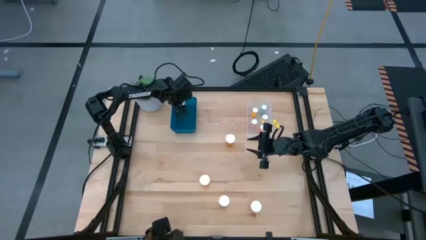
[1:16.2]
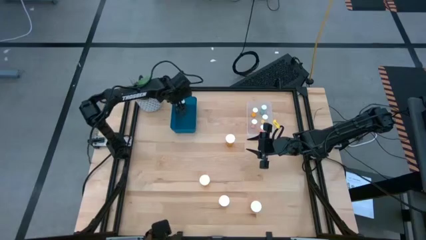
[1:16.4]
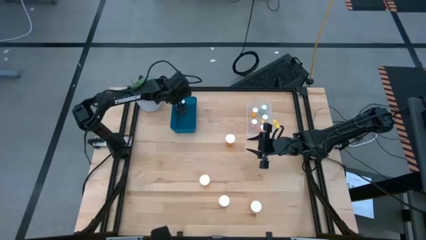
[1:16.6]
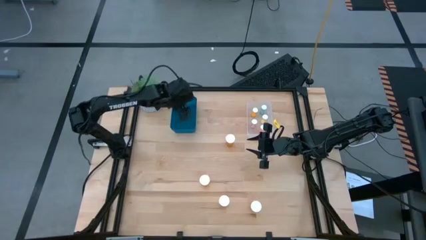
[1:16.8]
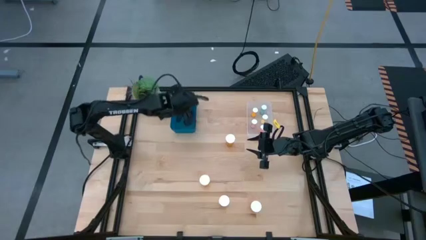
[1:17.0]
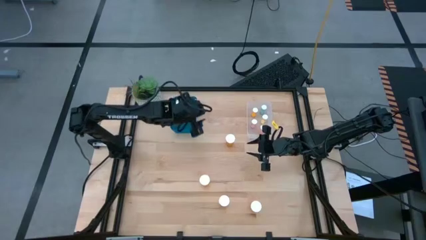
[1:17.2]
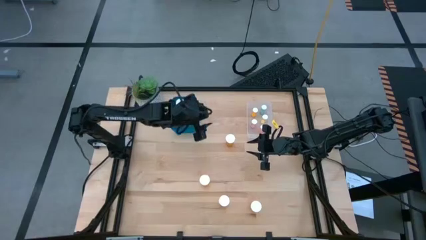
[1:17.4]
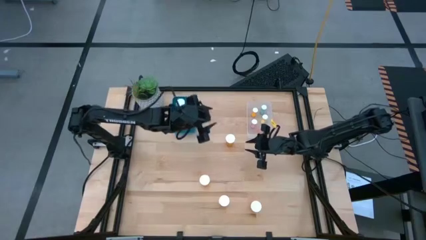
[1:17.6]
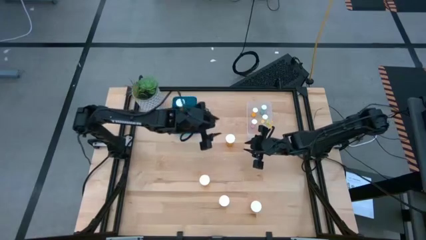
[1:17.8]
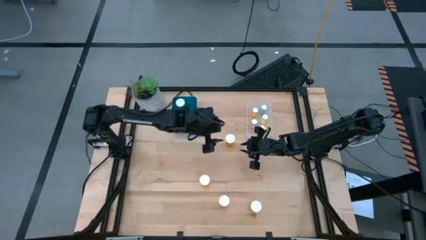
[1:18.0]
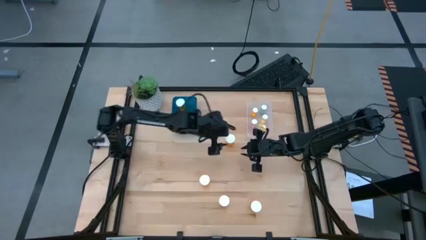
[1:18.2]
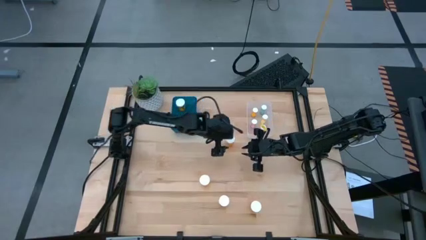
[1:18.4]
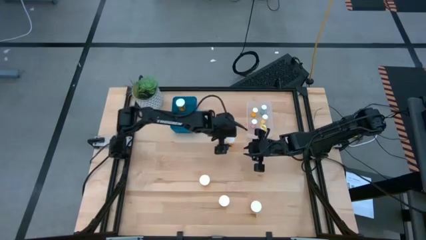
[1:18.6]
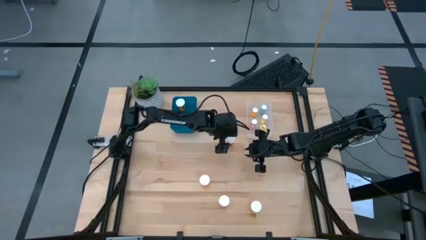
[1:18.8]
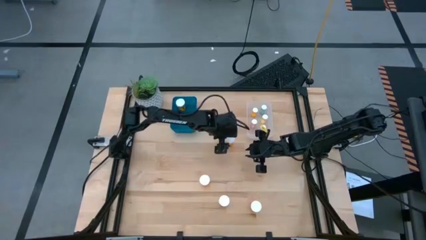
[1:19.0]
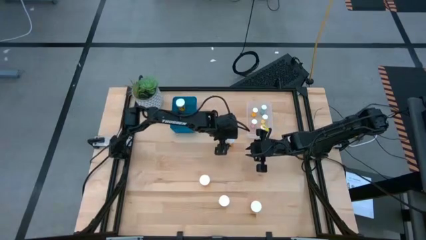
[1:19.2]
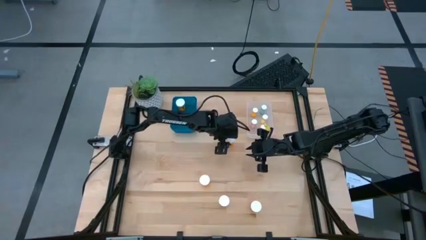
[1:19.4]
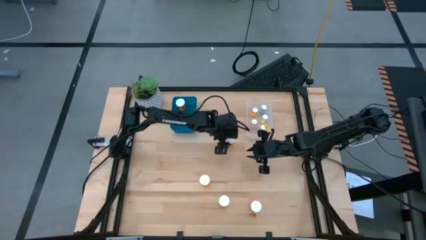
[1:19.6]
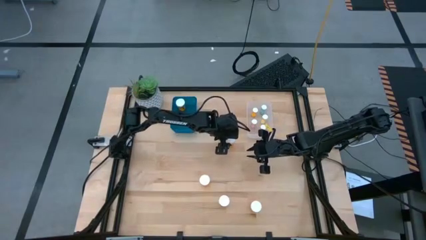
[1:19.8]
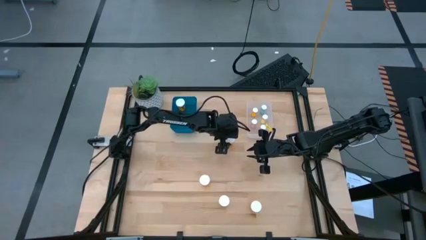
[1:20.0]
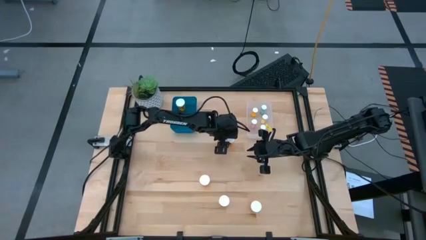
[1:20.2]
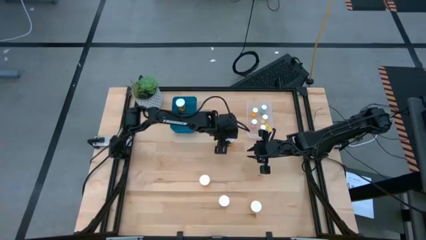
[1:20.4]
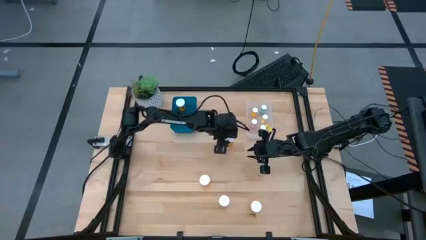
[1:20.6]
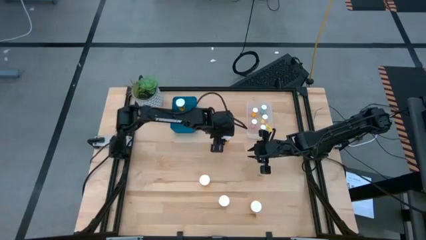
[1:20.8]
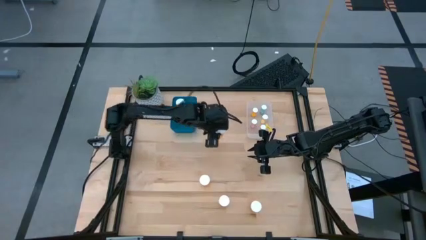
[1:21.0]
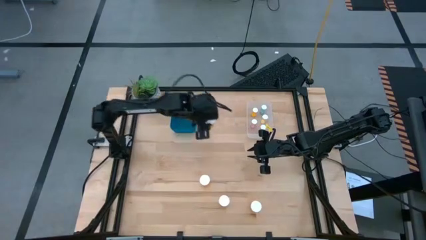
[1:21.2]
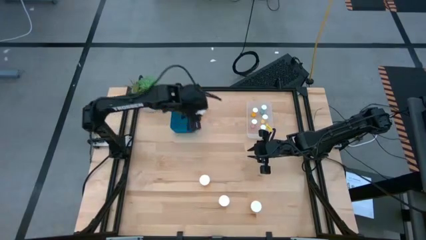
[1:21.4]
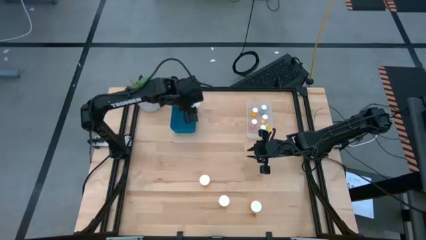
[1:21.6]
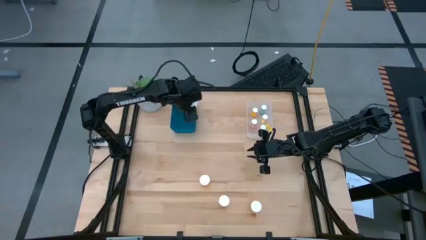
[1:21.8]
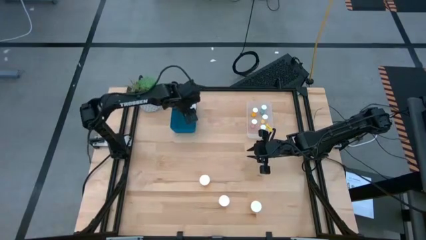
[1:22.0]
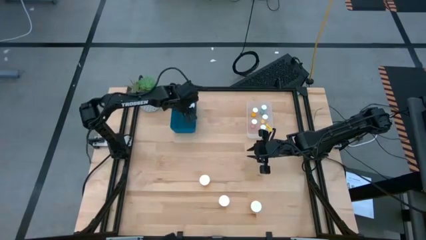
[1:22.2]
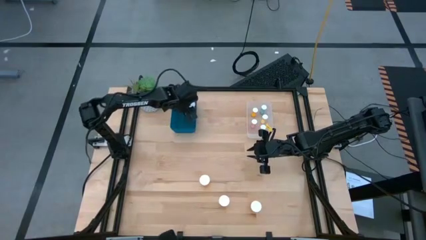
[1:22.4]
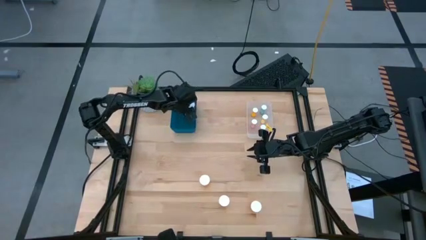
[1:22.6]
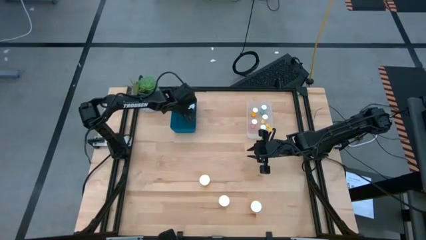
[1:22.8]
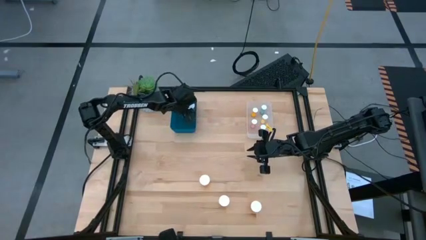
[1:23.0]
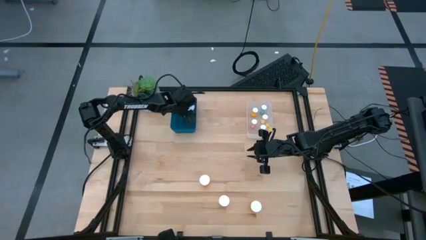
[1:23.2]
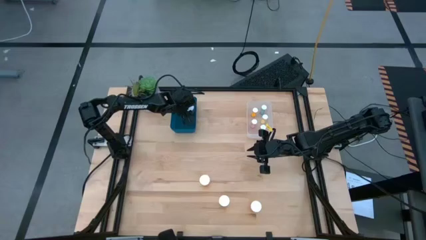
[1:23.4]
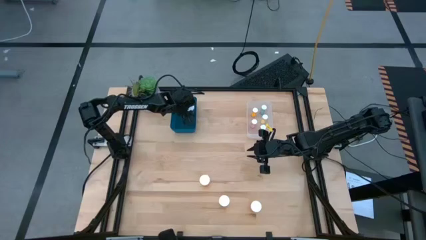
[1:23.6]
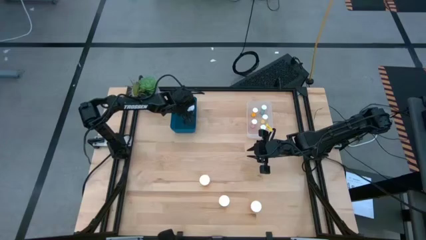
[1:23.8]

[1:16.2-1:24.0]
Task: Pick and place medicine bottles into bin by pill shape (circle, oval)
Put the large orange pill bottle into the blue bin

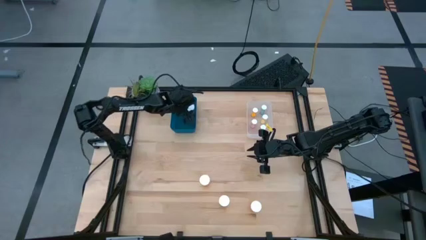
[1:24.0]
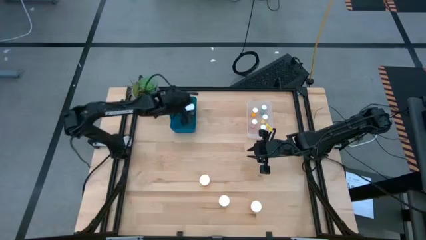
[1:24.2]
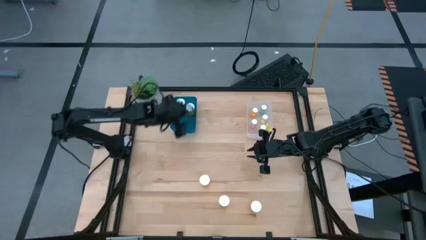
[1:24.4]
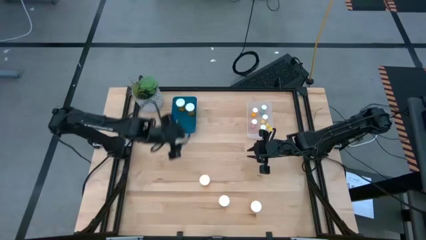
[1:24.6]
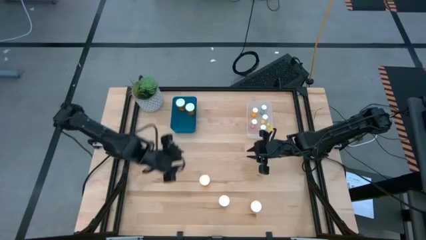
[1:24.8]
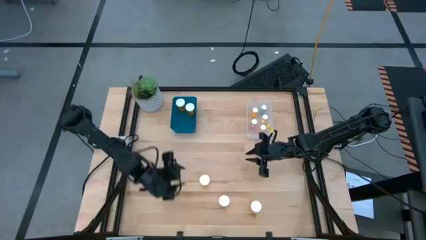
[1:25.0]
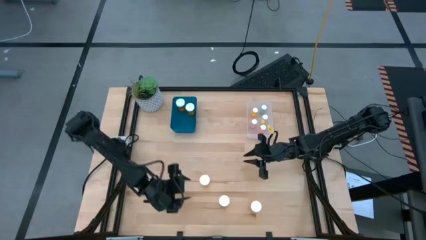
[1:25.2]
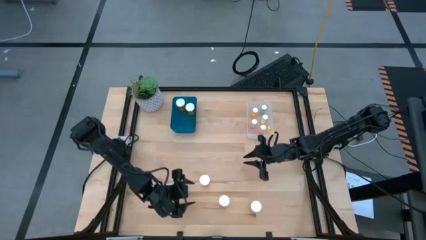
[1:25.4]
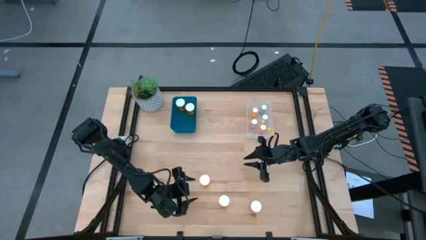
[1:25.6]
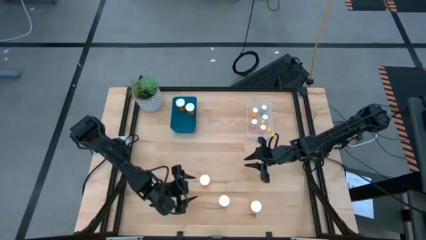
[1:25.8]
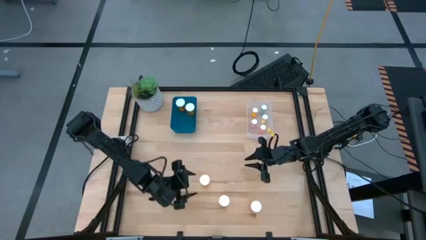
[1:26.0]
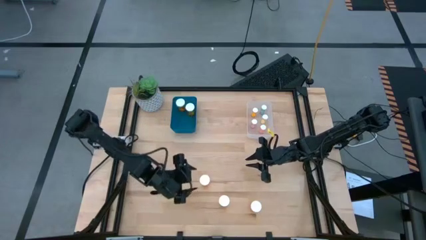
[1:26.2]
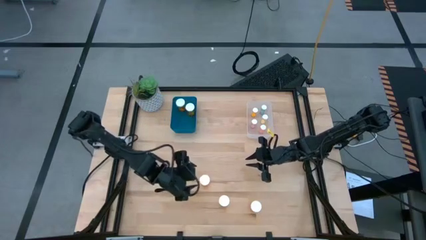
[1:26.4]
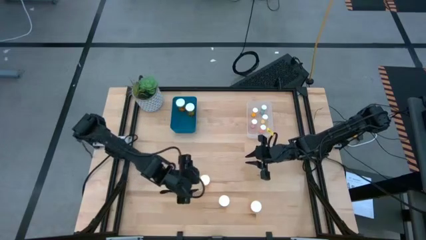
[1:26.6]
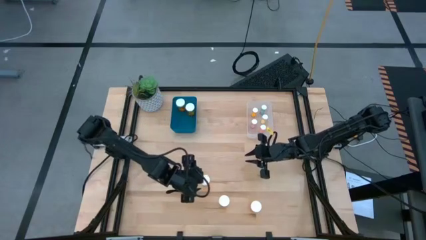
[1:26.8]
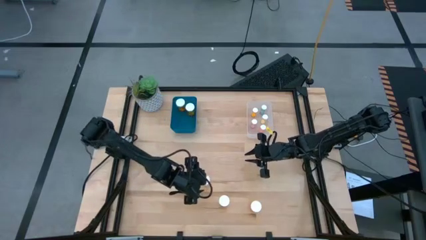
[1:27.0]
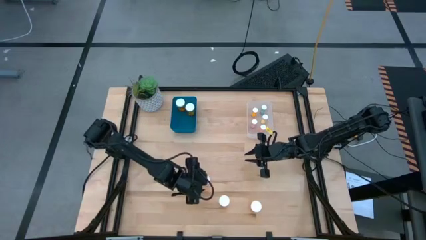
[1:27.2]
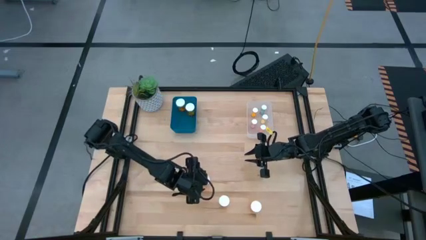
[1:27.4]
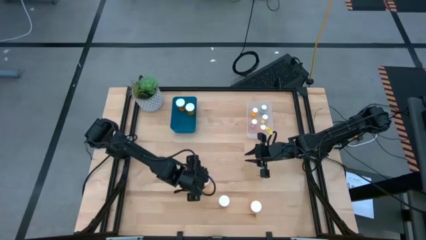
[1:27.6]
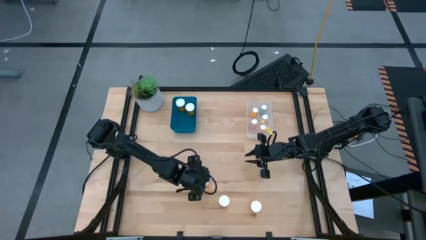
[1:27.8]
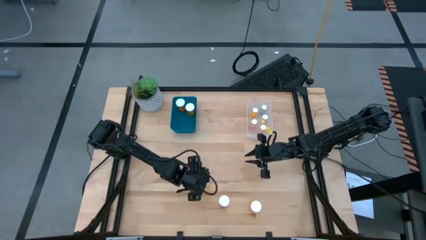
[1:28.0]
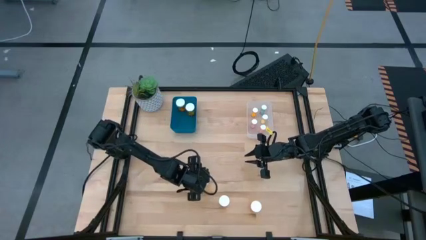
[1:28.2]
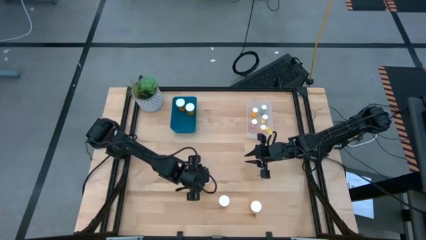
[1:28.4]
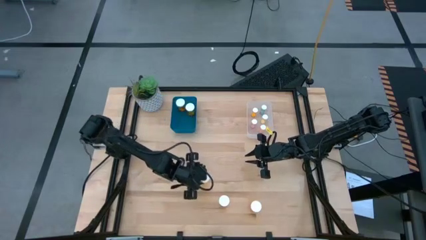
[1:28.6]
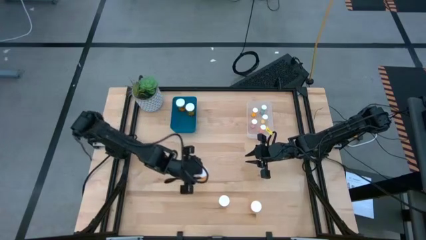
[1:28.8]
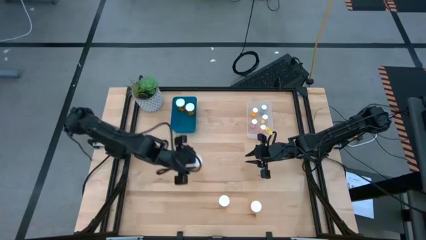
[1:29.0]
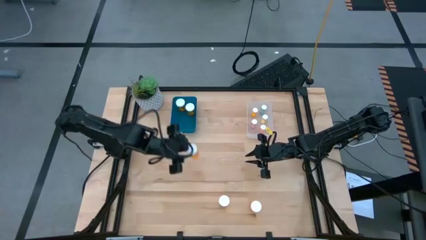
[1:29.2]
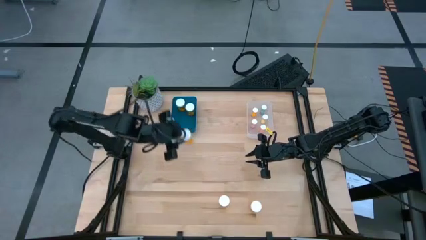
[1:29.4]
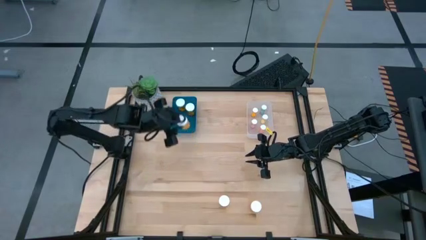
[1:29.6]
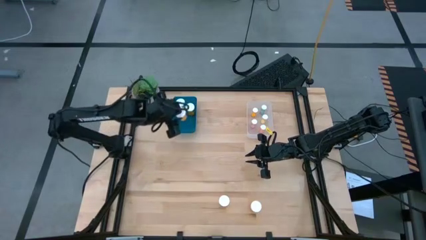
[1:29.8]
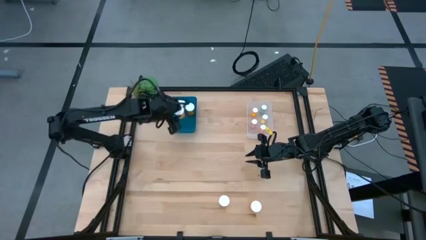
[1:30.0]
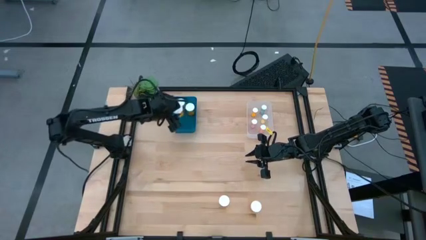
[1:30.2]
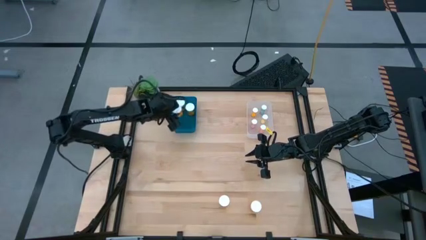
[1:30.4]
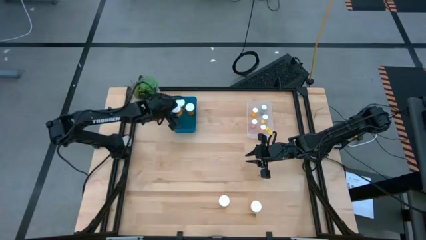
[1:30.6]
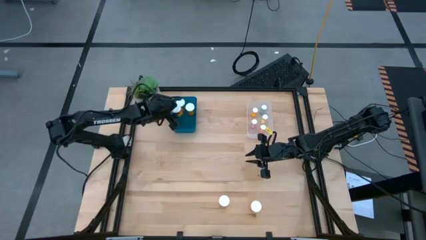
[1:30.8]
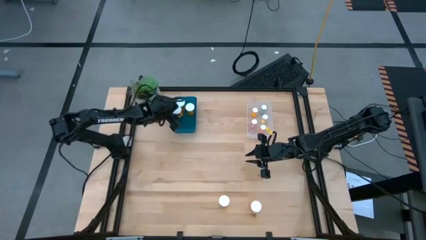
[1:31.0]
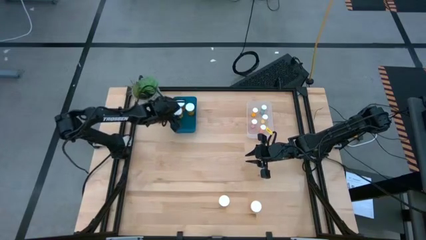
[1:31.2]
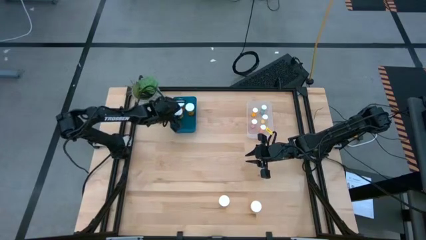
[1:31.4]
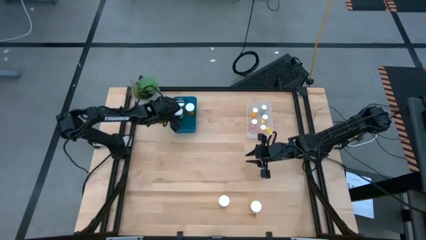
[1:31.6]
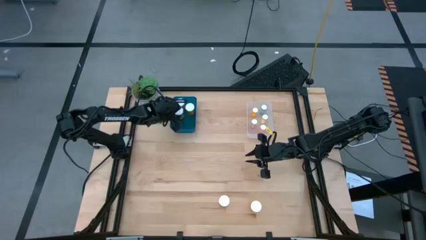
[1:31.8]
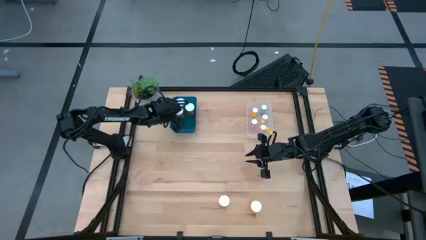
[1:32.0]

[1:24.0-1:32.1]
Put the large orange pill bottle into the blue bin
